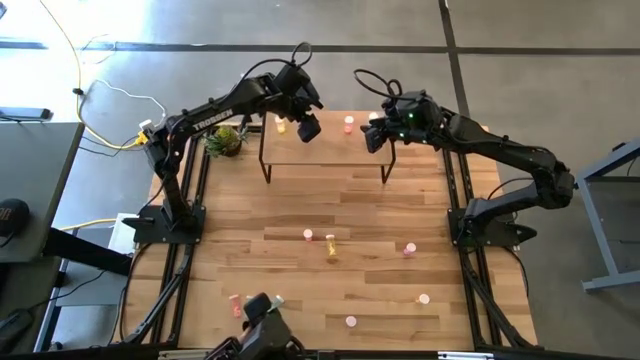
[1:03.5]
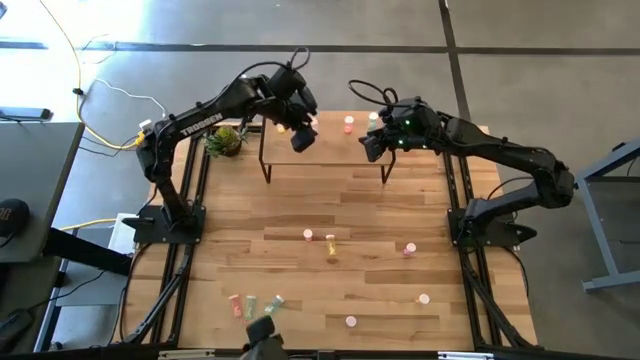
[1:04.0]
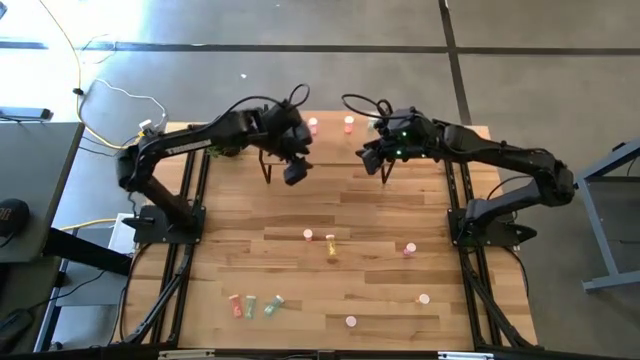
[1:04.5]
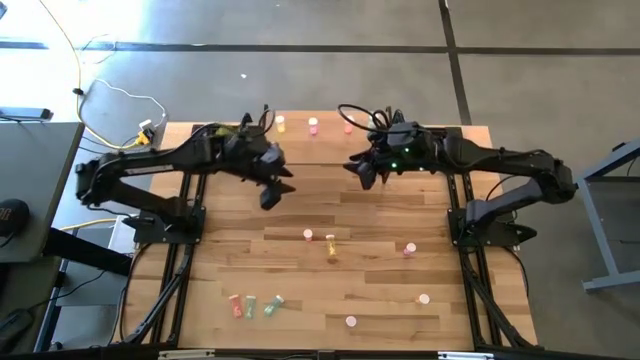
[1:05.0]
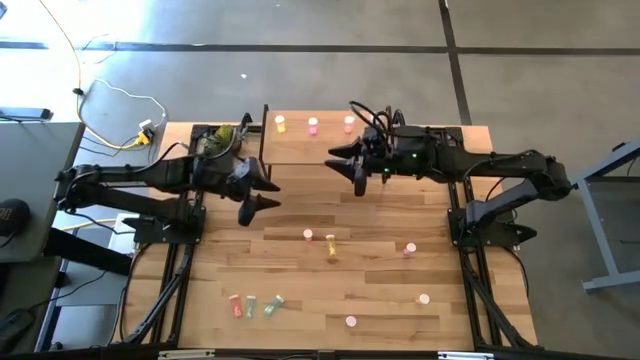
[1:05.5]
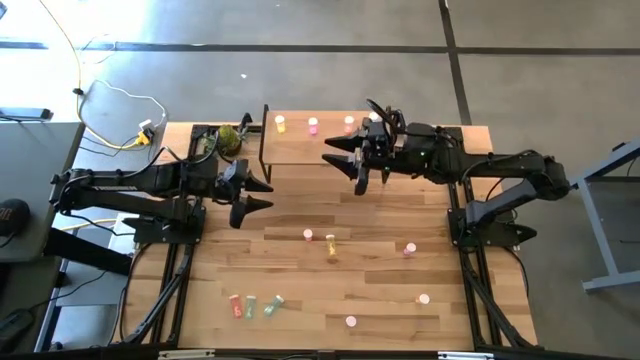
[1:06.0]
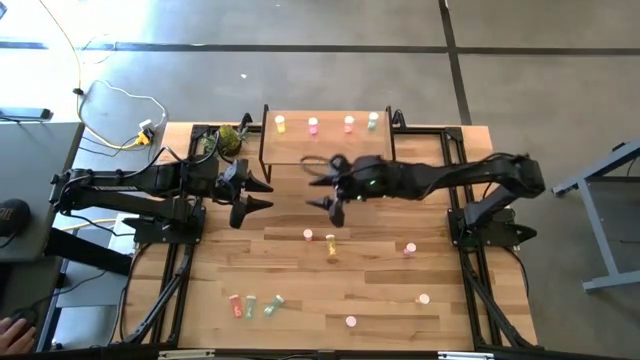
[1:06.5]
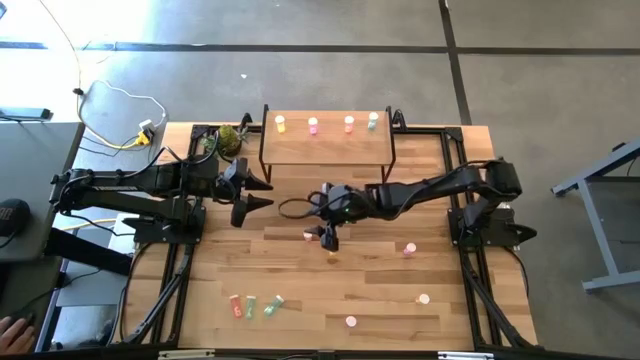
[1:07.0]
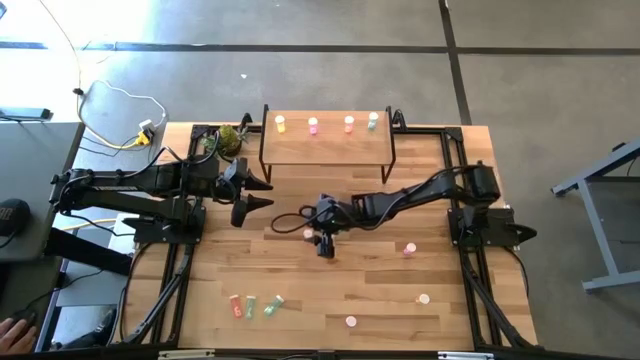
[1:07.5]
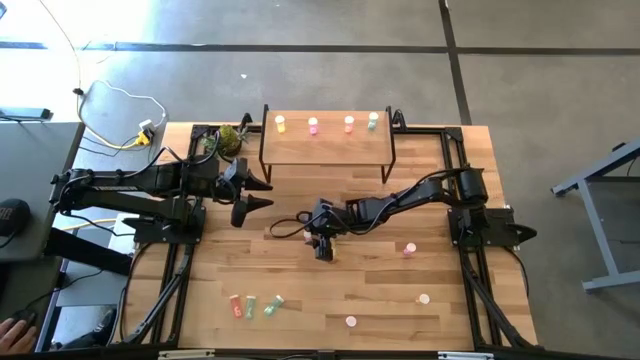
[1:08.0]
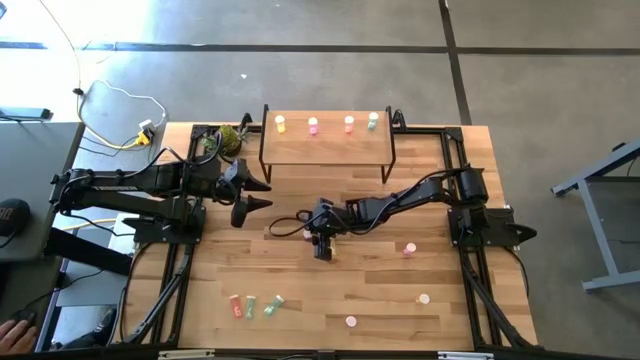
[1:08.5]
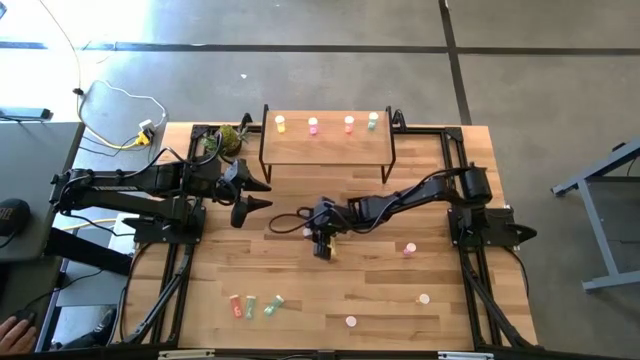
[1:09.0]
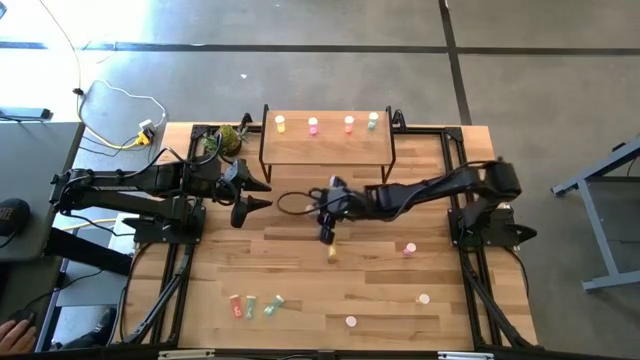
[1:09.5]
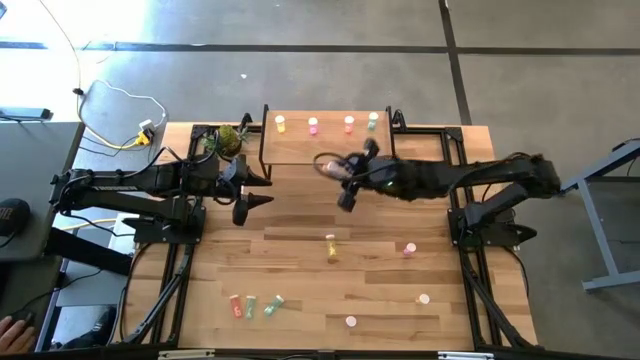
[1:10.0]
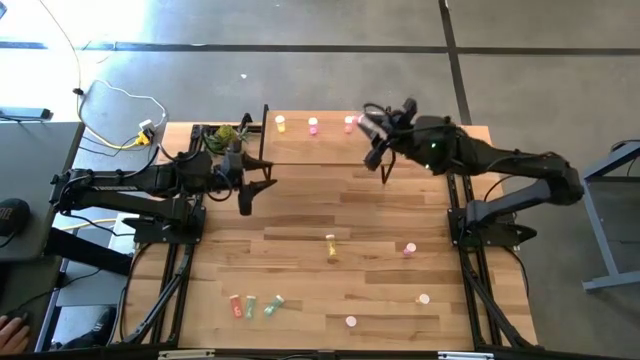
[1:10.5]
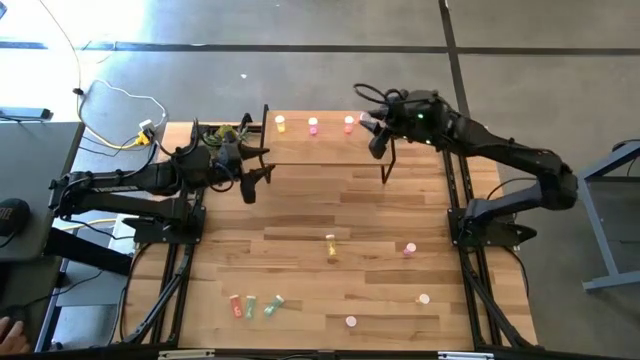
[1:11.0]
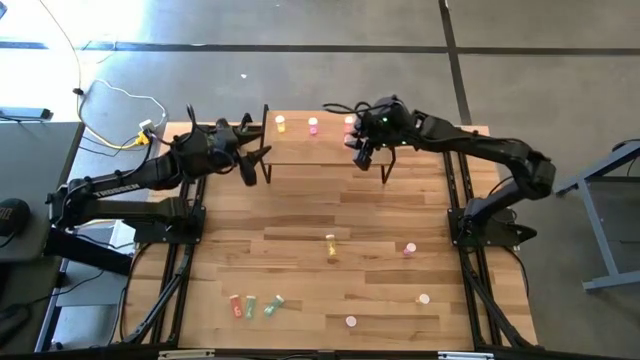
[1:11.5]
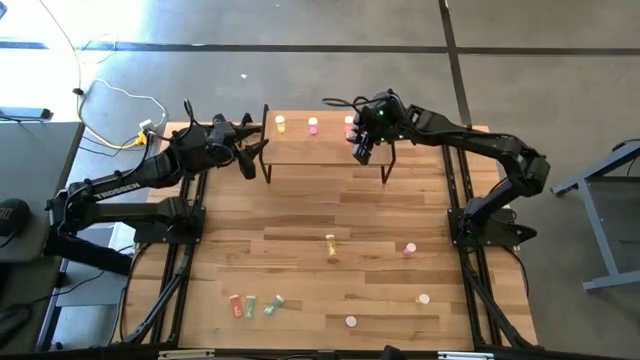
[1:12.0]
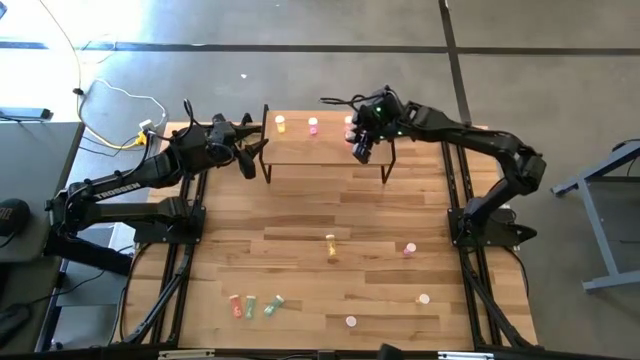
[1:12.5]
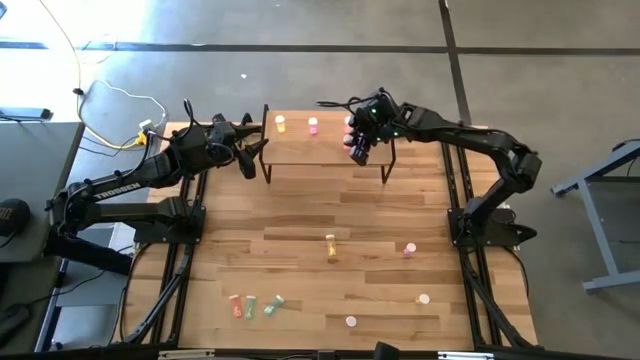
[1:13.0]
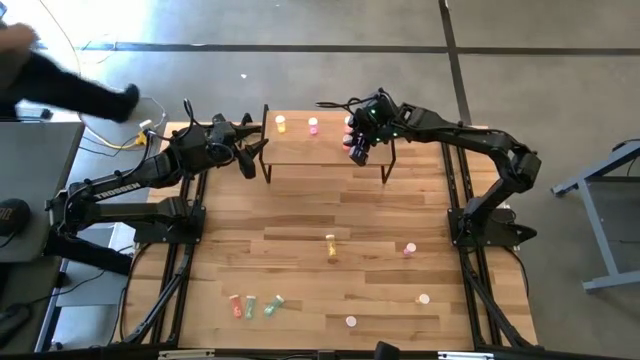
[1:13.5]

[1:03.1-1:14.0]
Task: Pick and place medicine bottles onto shelf by color
Put the top red pill bottle on the shelf

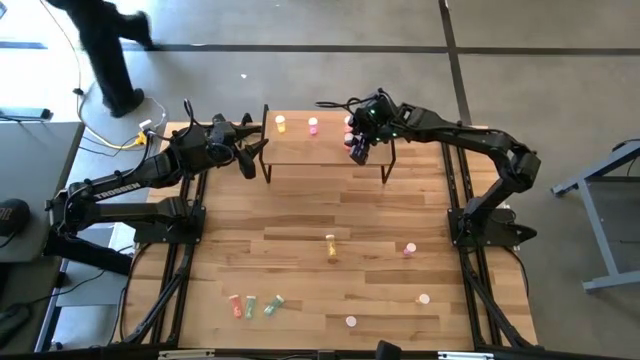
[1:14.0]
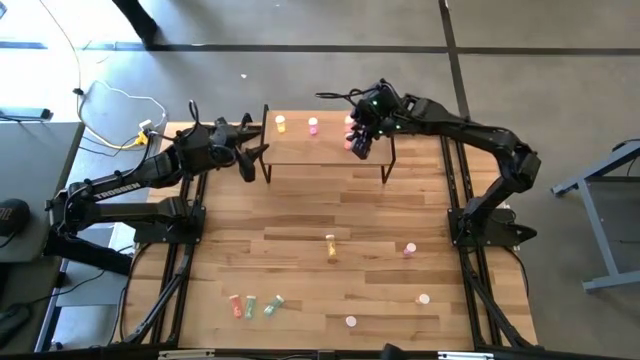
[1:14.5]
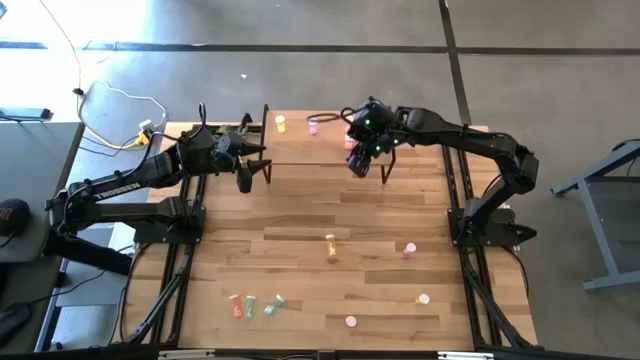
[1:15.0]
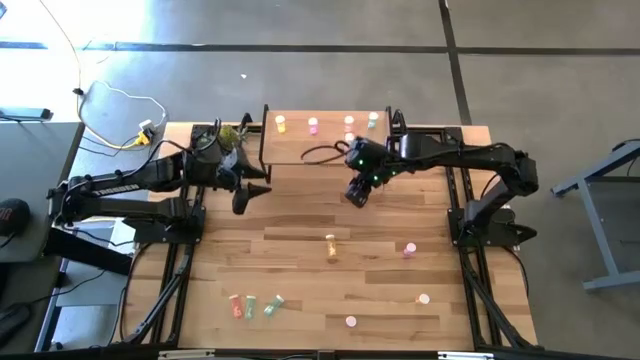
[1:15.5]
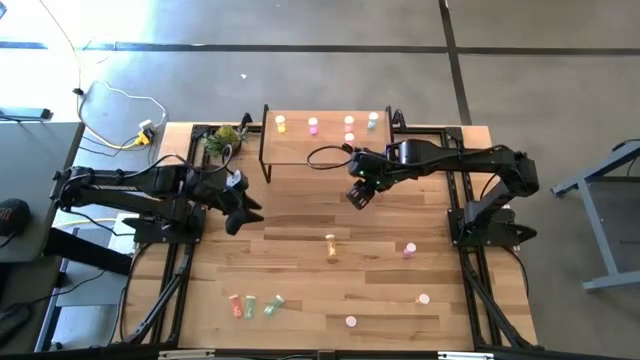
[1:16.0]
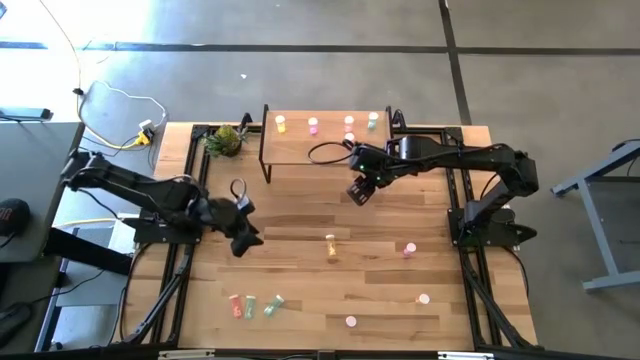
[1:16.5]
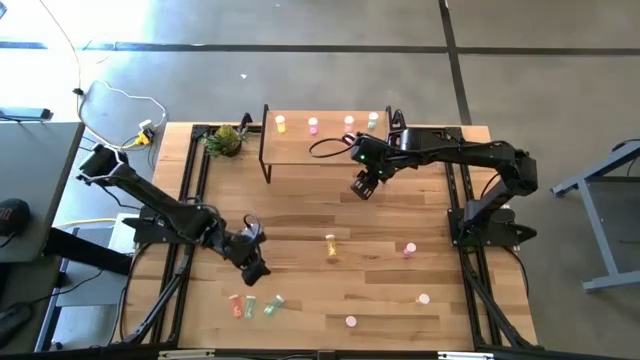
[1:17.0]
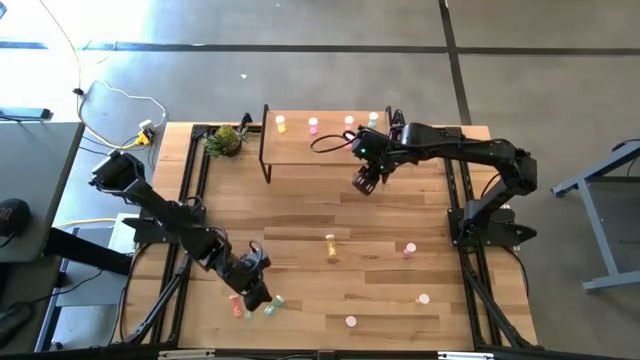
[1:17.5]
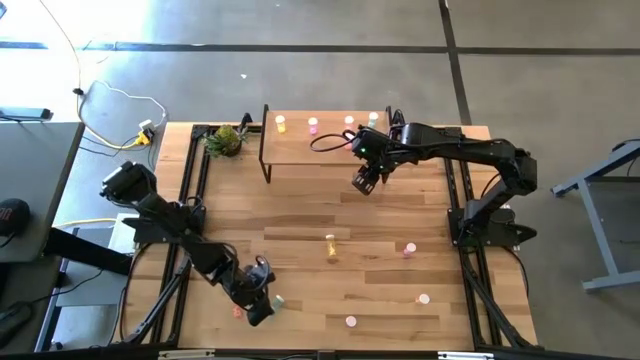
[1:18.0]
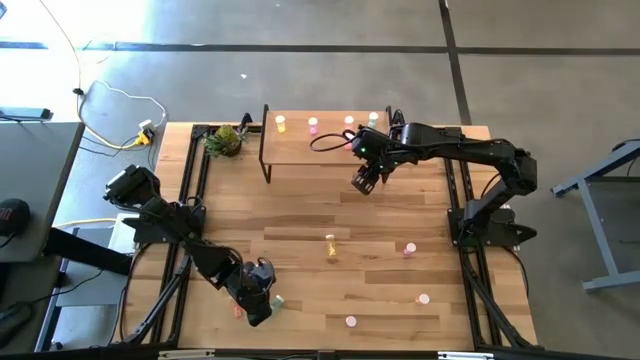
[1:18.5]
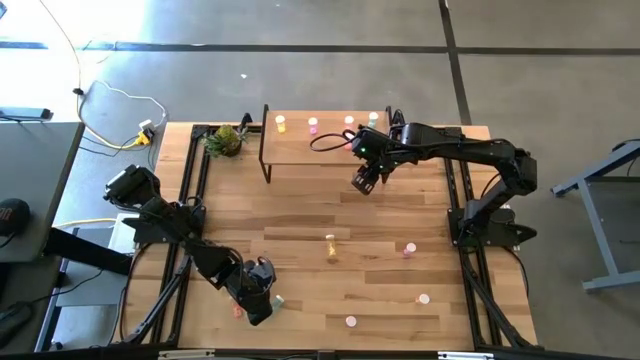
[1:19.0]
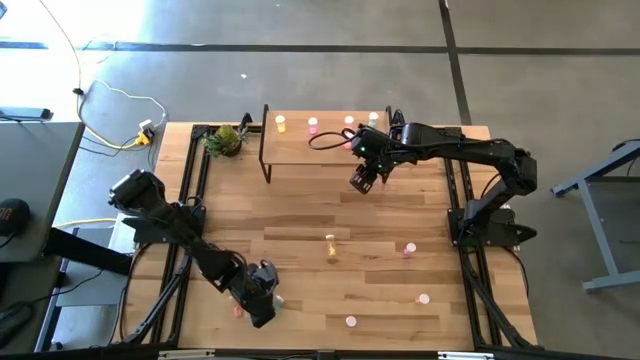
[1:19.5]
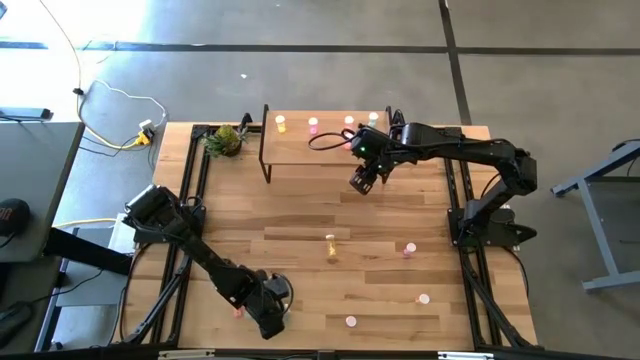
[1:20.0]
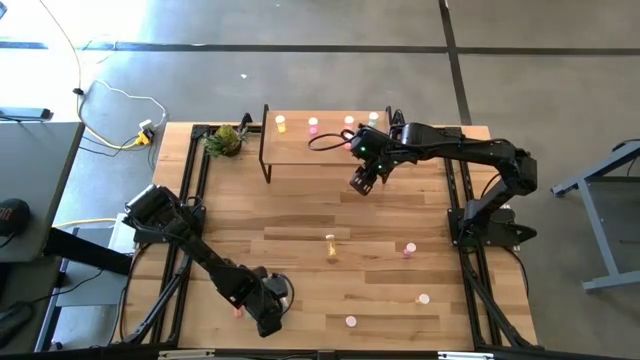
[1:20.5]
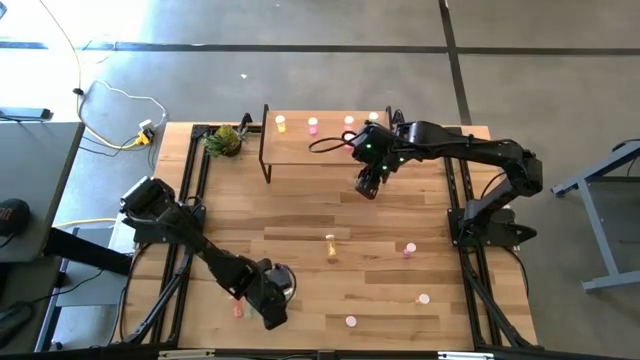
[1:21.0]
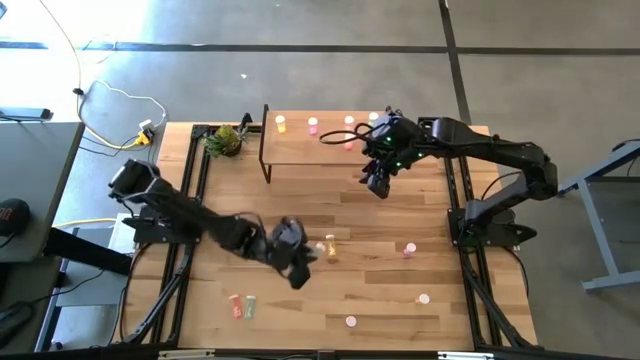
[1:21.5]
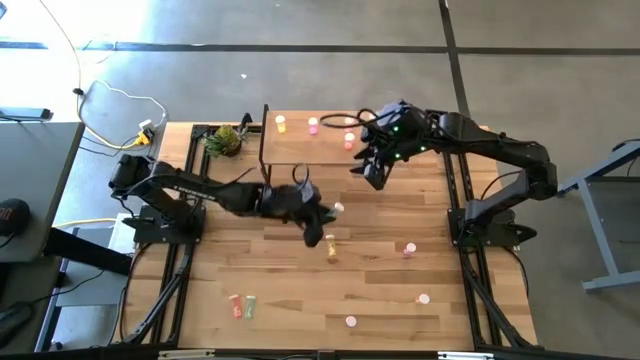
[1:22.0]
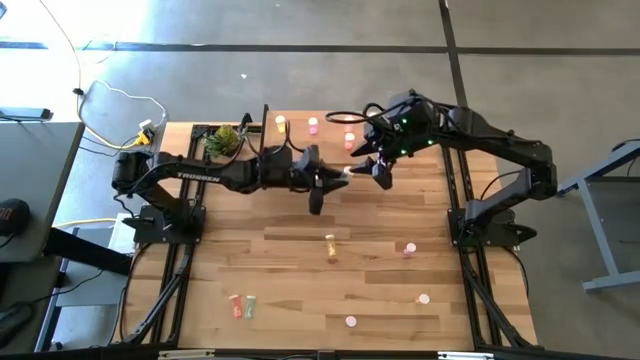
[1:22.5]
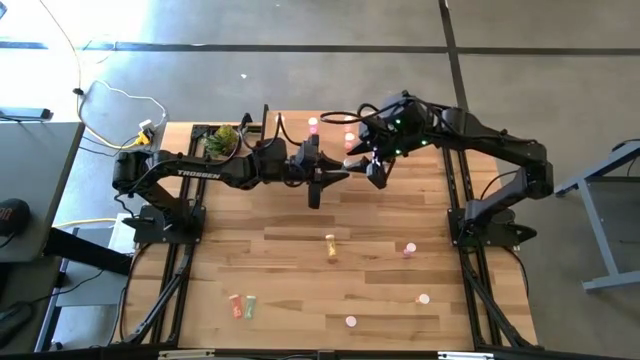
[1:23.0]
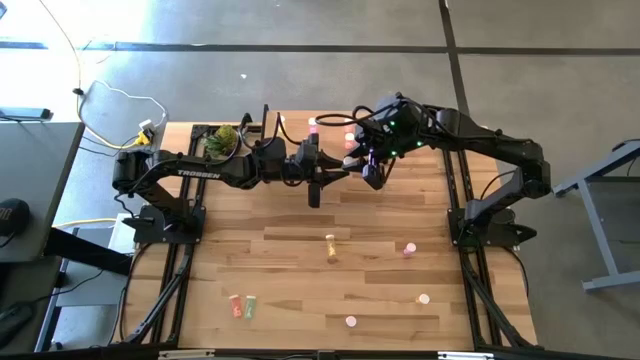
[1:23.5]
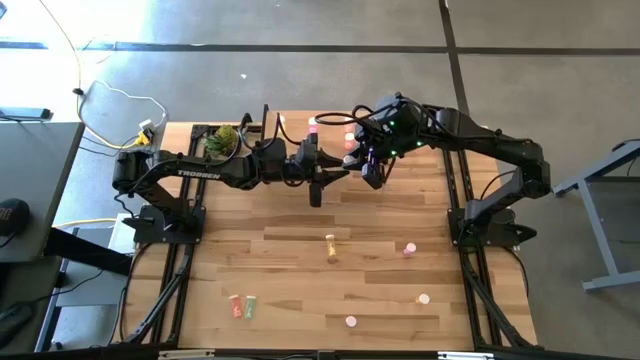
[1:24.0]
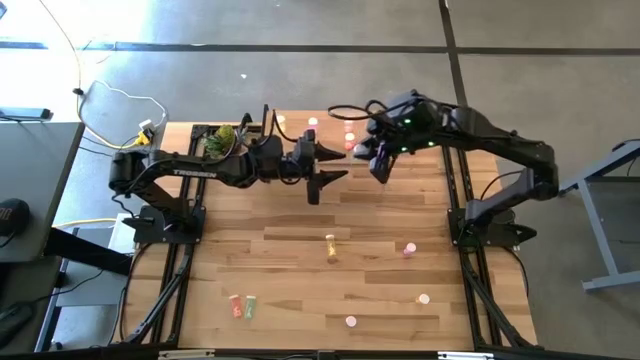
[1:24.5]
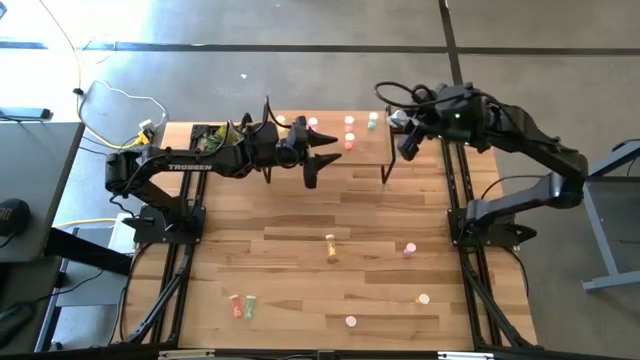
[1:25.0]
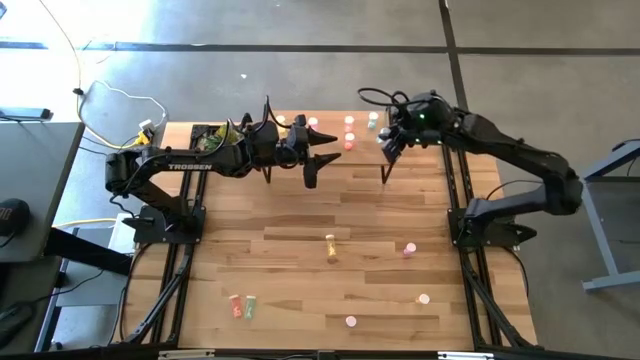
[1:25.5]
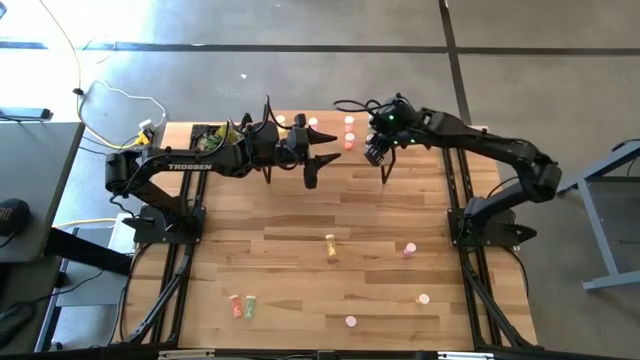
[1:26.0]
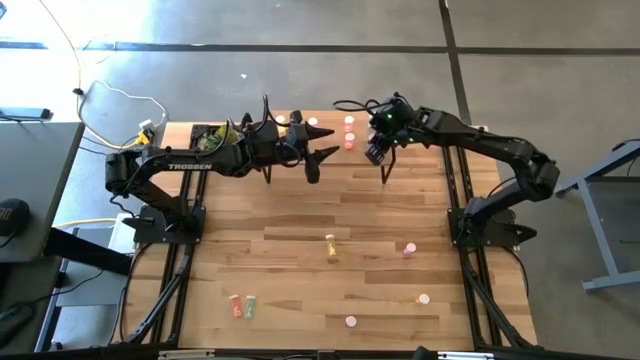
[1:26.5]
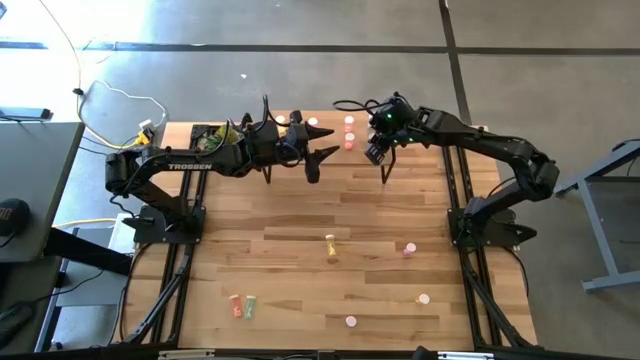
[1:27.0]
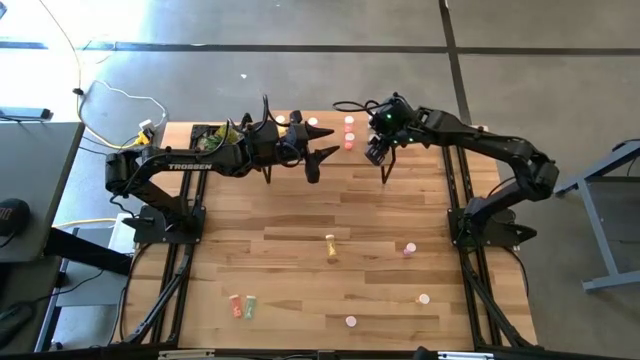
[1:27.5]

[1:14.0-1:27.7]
Put the right pill bottle on the shelf
